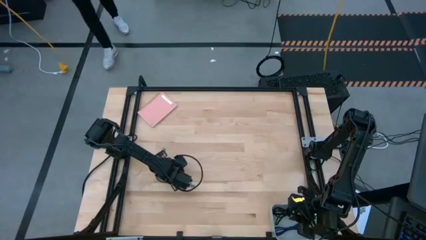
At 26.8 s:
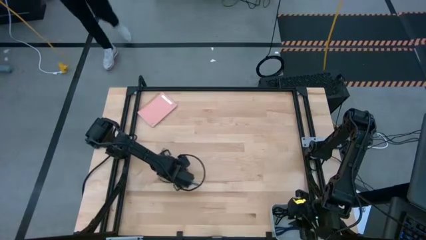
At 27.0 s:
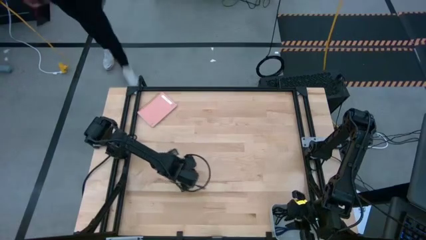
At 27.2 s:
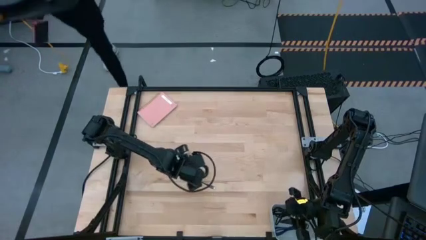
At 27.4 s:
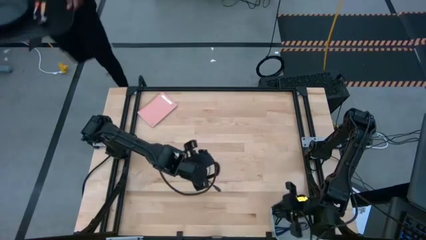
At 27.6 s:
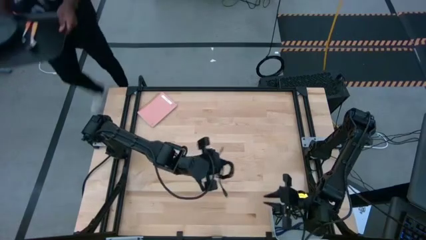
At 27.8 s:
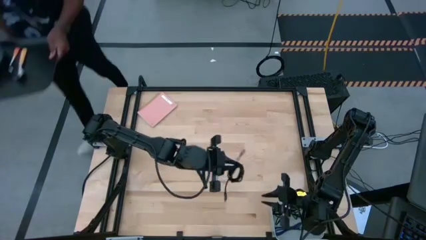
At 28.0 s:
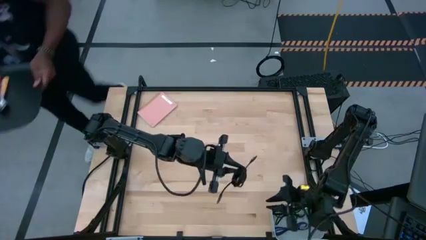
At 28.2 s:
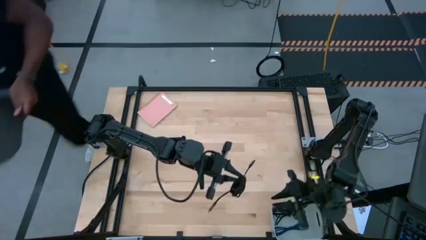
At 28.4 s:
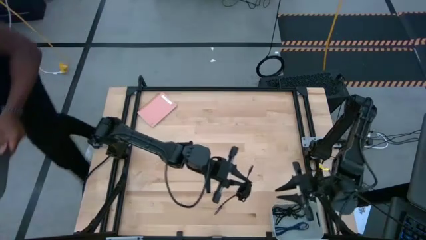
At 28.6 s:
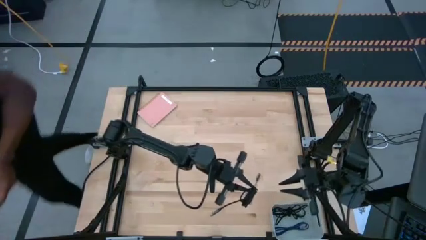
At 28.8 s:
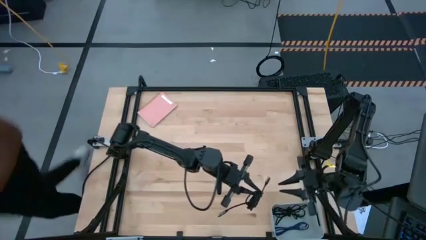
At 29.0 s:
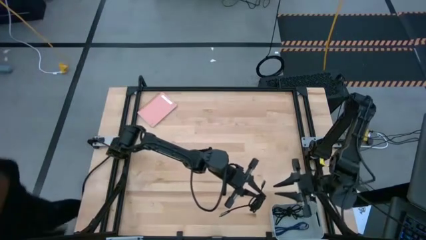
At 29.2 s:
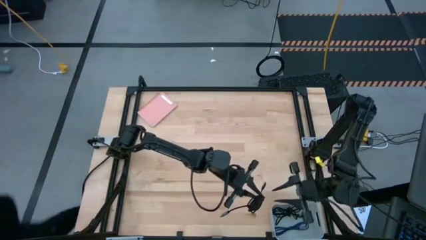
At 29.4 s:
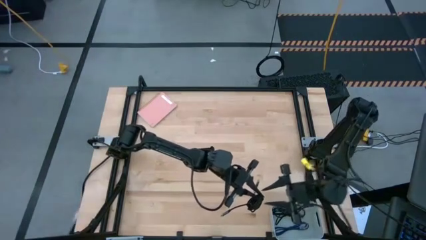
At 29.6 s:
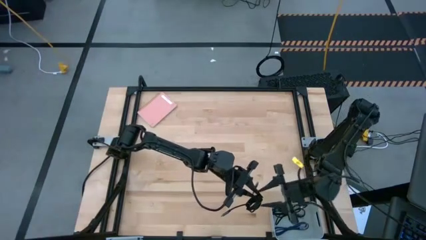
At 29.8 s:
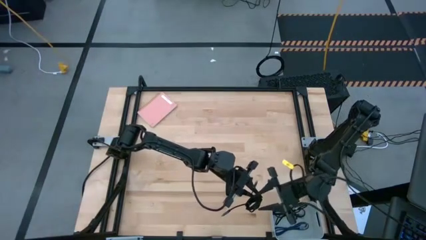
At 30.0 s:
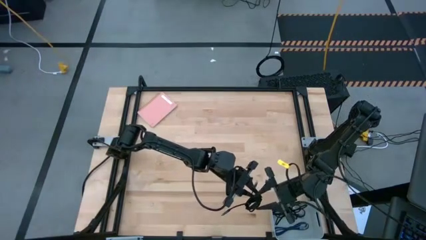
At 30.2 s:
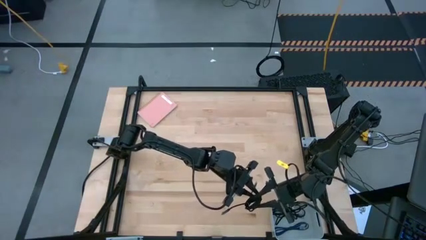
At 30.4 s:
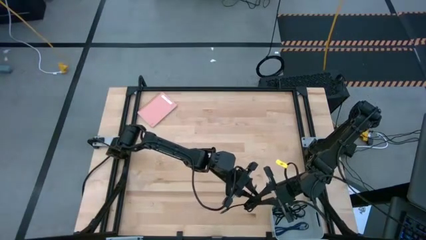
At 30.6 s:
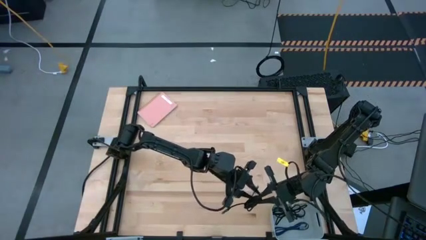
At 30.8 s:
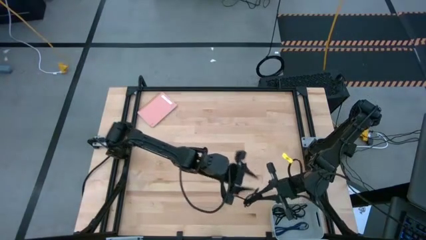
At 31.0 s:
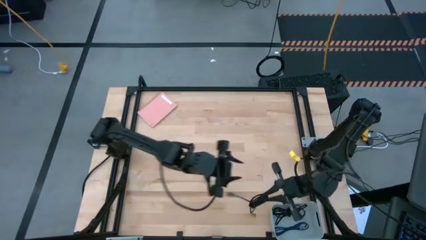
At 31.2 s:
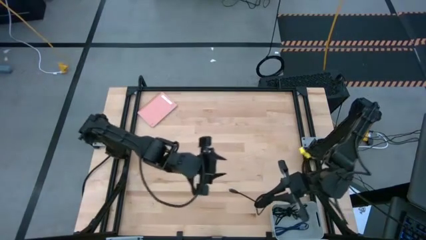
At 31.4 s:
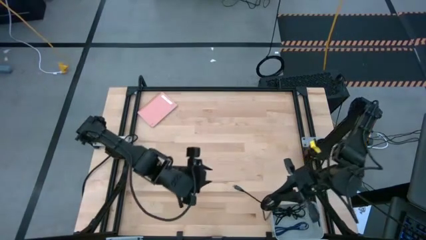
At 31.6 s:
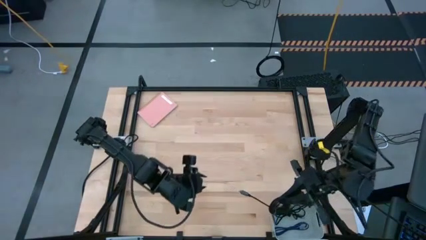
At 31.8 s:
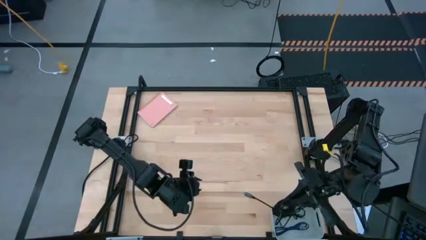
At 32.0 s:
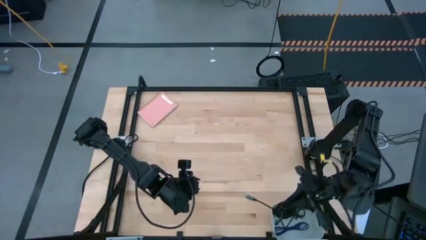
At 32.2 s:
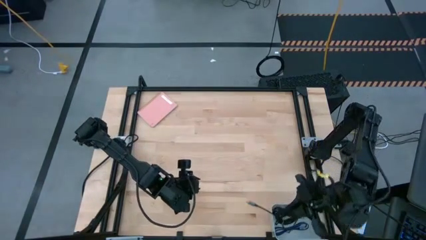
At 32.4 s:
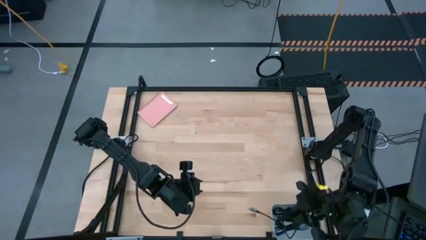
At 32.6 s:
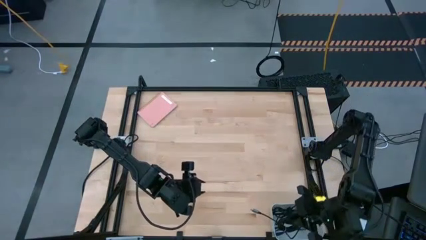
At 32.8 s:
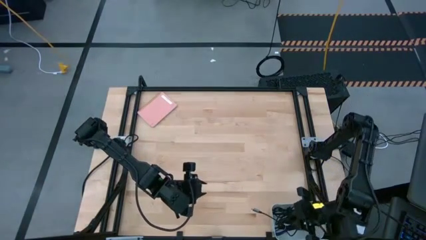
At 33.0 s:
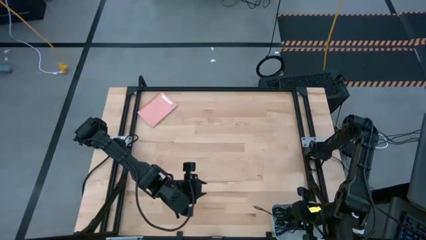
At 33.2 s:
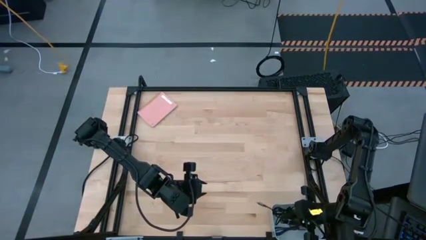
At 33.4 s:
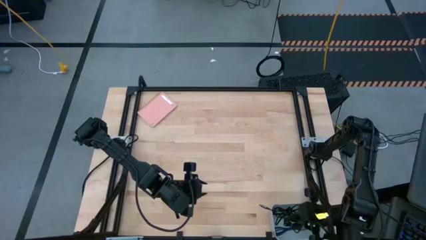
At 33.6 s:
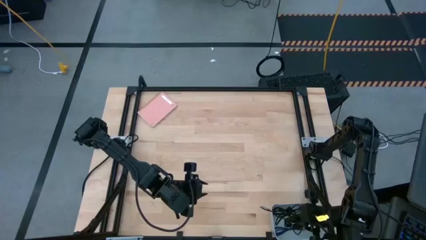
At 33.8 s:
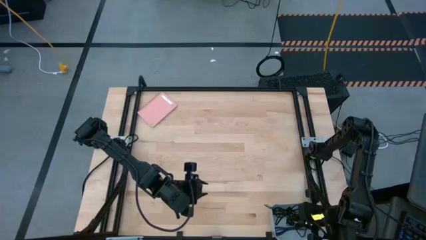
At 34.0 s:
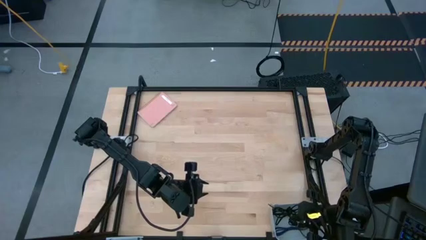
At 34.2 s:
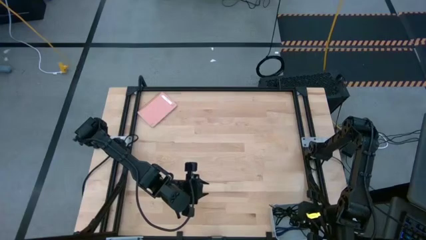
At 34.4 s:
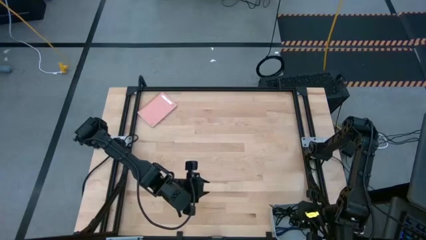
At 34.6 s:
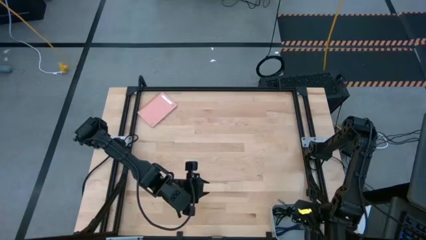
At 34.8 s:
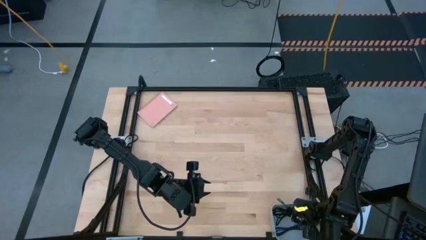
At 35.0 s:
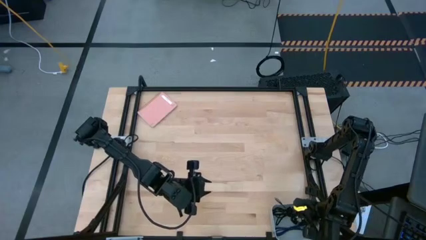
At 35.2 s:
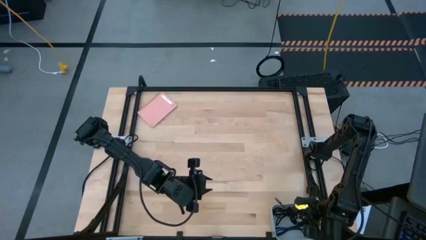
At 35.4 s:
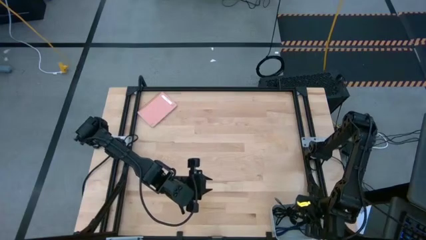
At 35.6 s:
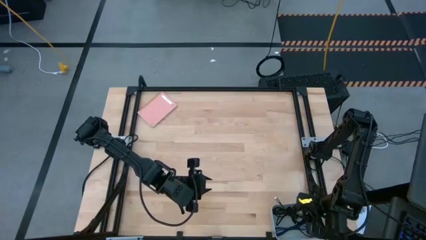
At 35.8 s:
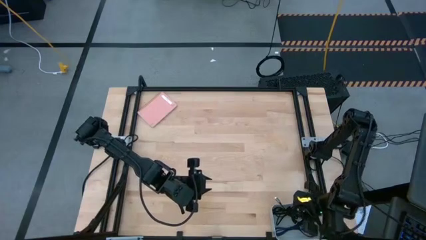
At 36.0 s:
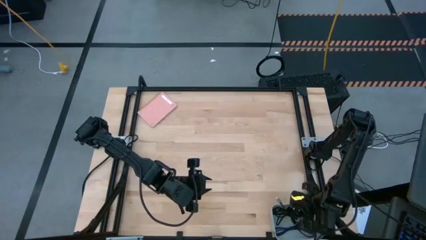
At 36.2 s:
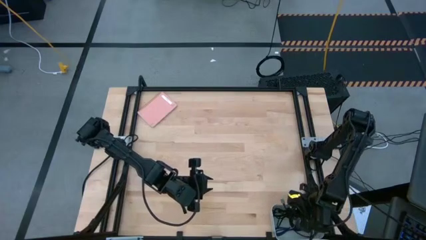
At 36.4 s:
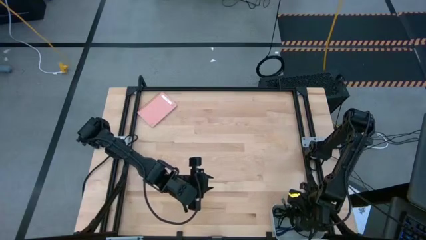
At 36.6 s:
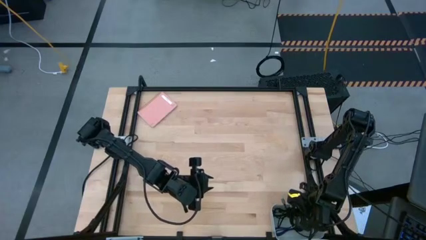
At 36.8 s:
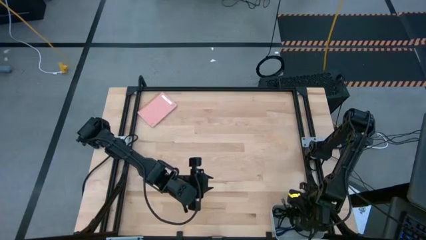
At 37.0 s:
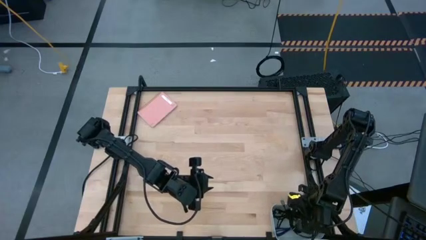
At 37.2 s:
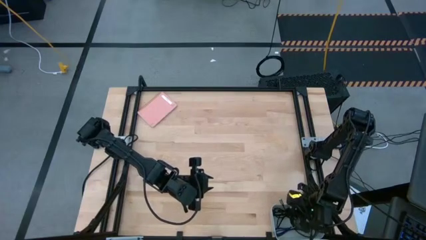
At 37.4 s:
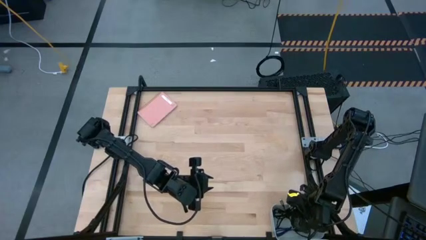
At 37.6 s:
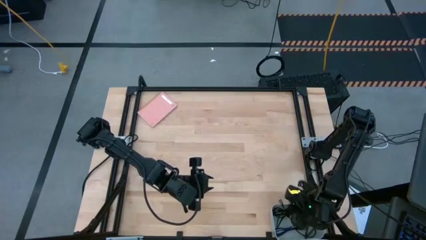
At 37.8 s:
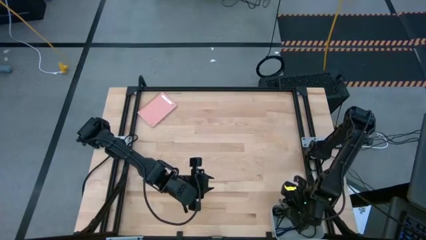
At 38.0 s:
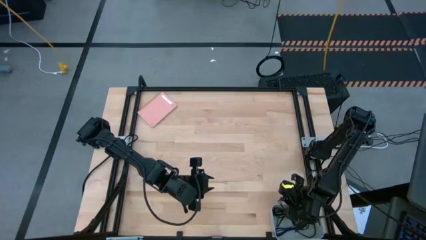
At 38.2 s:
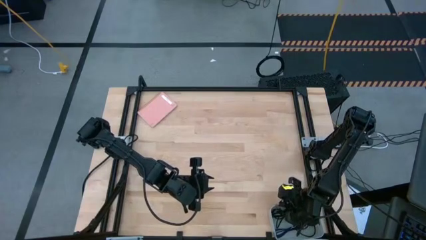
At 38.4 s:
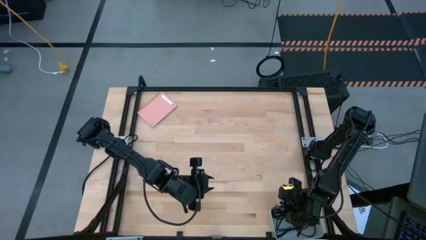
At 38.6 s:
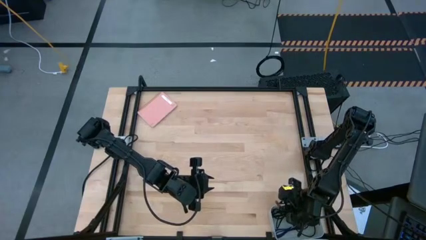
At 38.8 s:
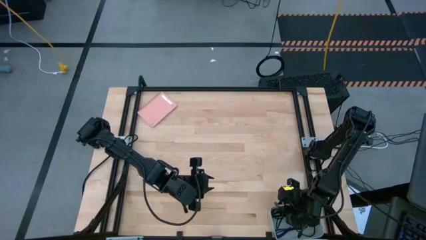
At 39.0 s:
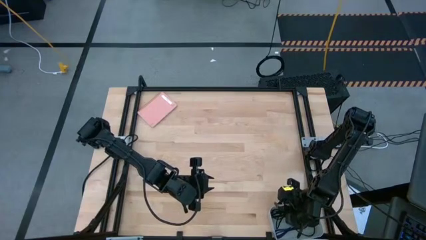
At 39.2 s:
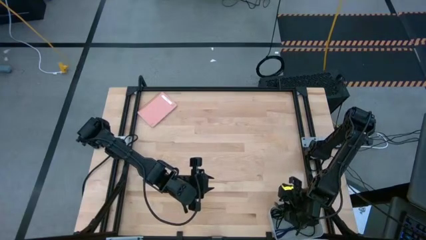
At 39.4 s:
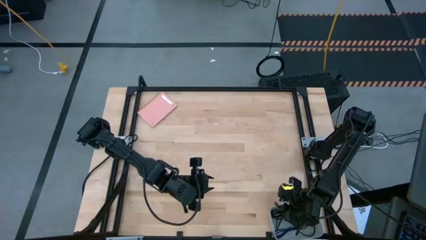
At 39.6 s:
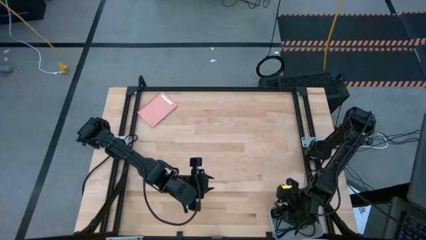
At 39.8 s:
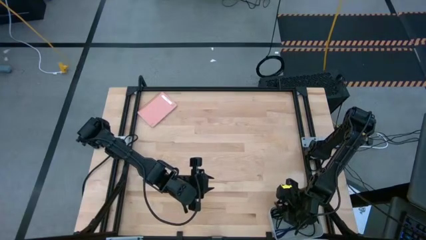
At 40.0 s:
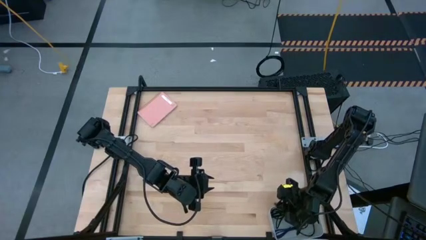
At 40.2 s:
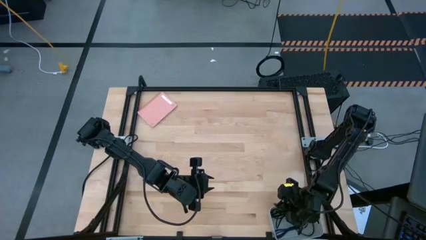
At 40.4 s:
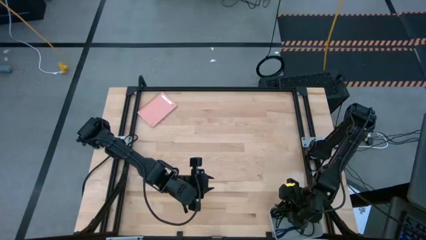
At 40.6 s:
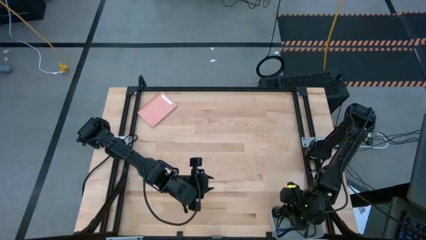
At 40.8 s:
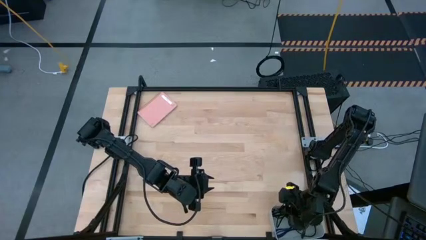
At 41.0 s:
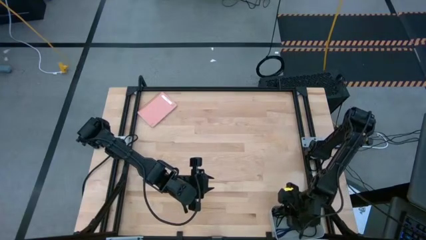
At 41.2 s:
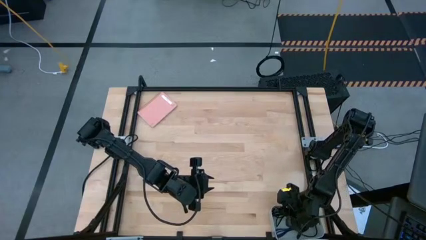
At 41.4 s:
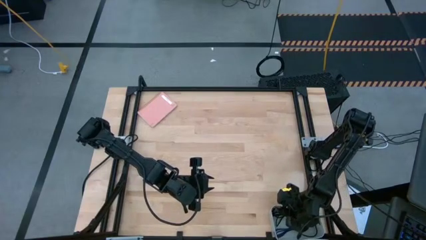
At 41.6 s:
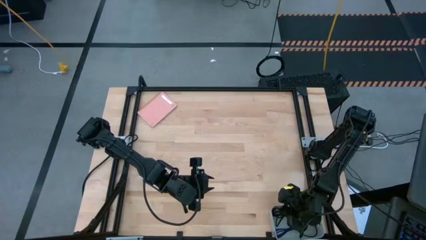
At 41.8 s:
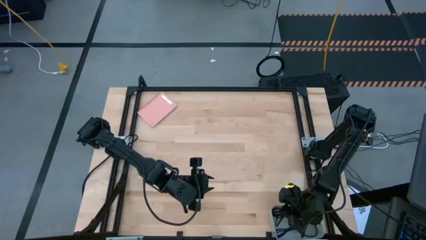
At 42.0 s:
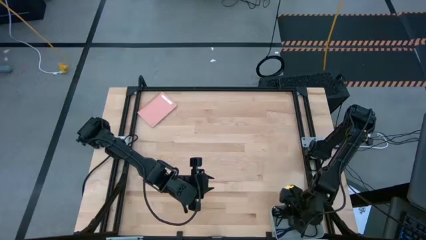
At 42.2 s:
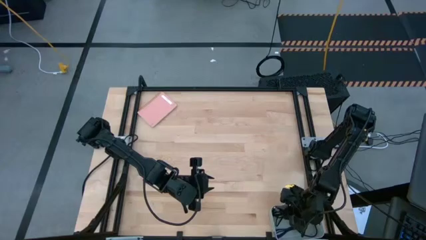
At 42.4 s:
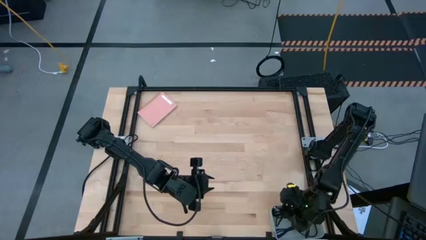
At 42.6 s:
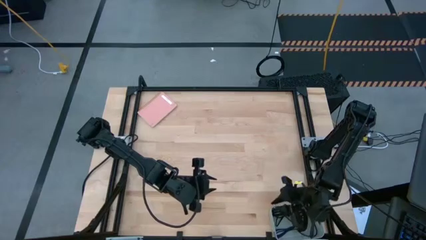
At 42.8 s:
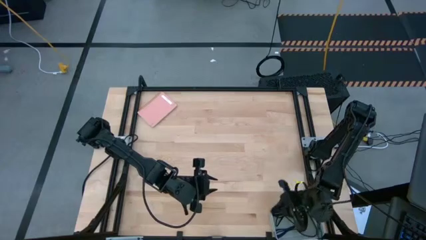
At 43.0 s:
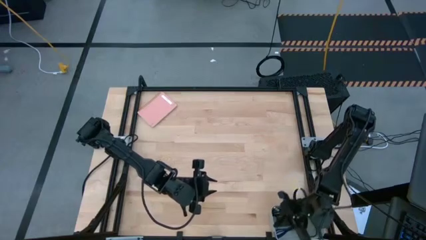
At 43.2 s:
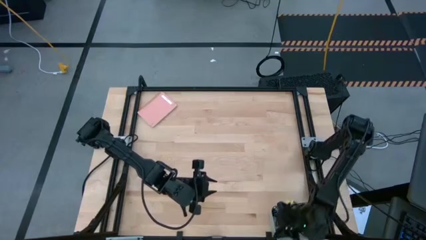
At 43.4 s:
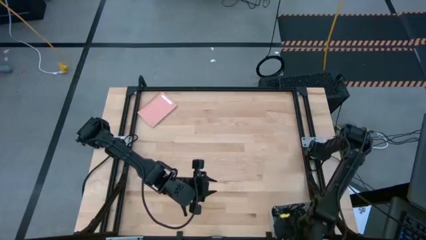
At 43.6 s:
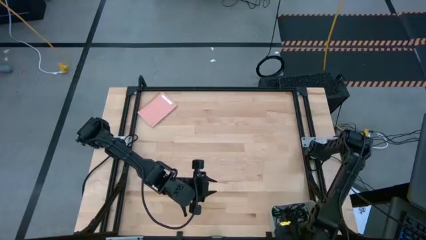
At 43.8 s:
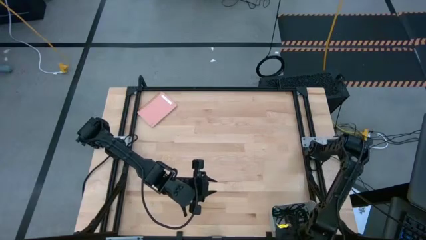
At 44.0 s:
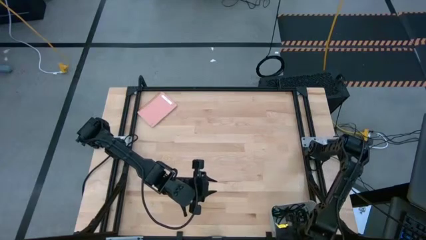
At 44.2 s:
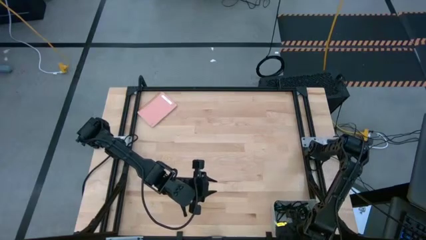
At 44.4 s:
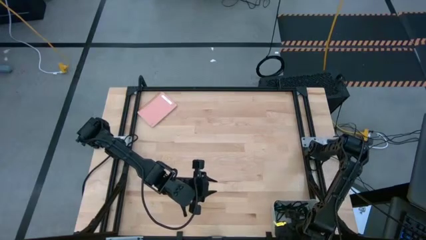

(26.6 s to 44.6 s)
Task: Pick and place USB-C Cables
Put the black charger cable into the bin
